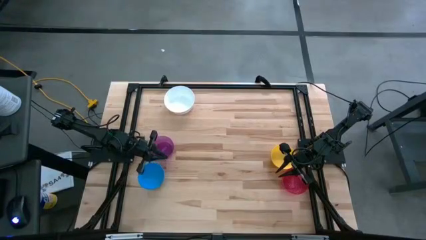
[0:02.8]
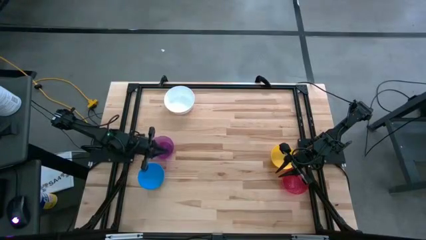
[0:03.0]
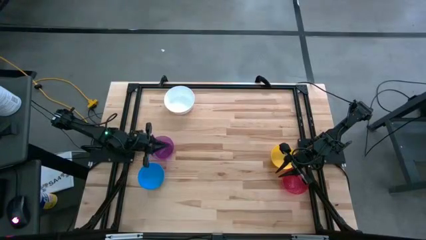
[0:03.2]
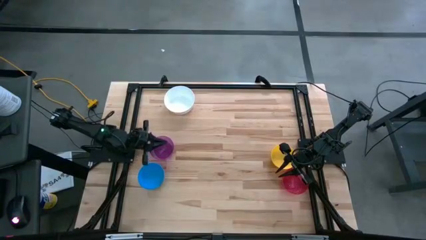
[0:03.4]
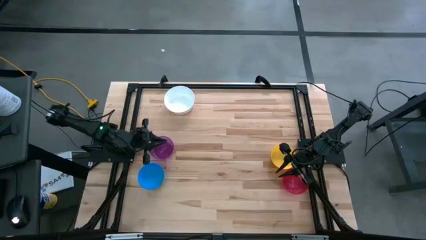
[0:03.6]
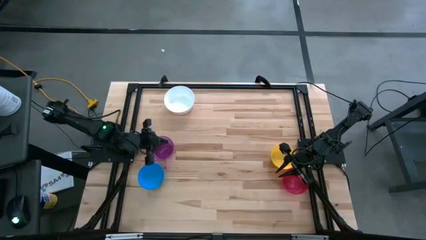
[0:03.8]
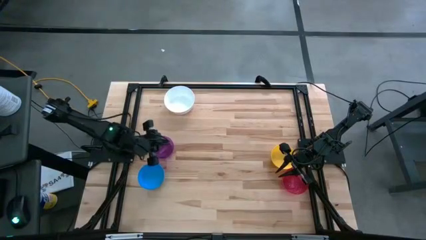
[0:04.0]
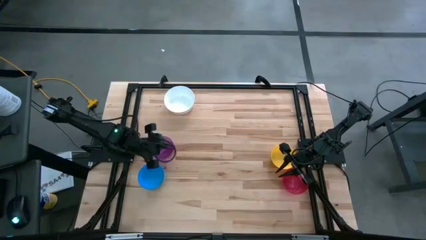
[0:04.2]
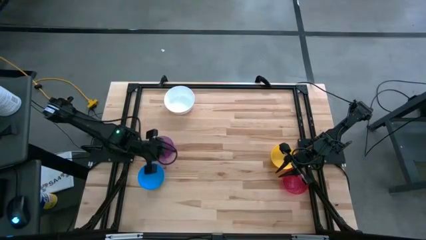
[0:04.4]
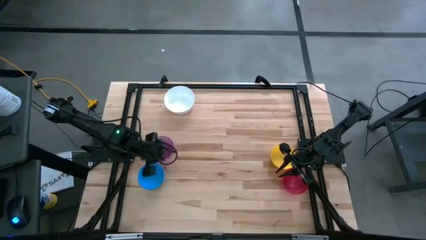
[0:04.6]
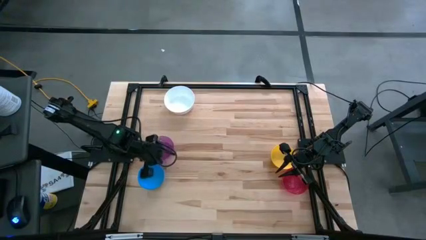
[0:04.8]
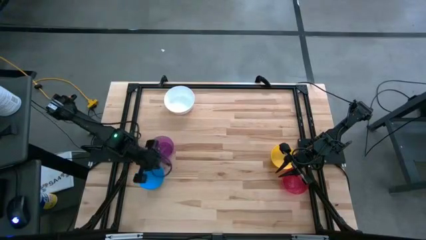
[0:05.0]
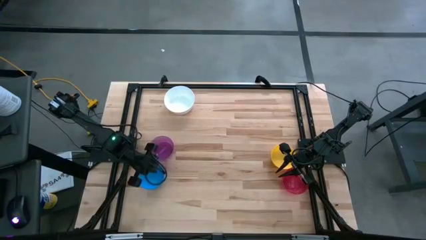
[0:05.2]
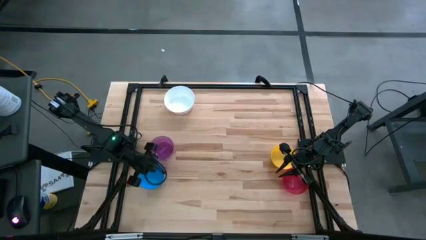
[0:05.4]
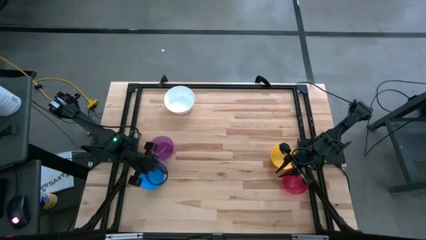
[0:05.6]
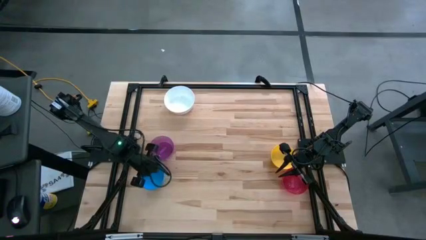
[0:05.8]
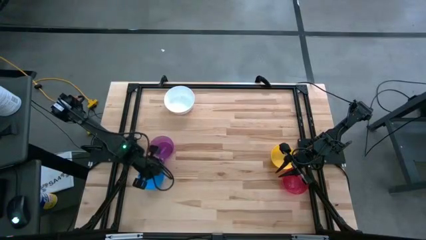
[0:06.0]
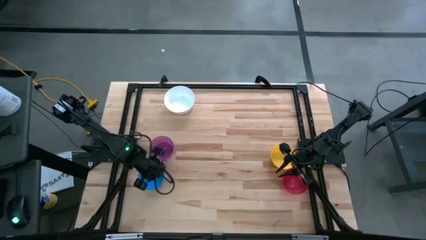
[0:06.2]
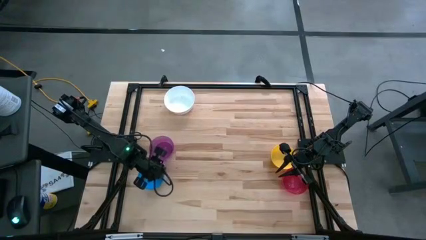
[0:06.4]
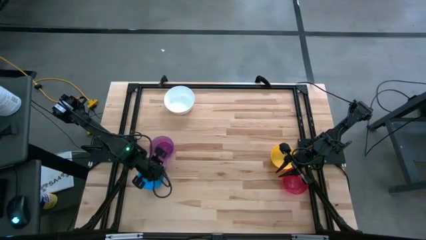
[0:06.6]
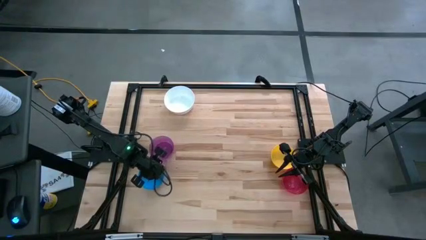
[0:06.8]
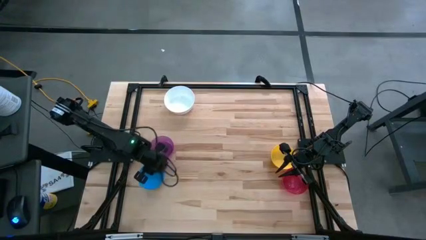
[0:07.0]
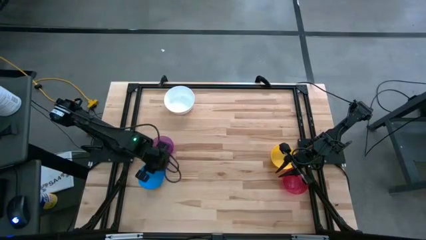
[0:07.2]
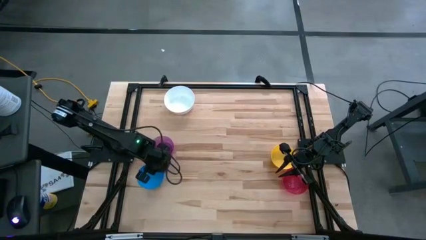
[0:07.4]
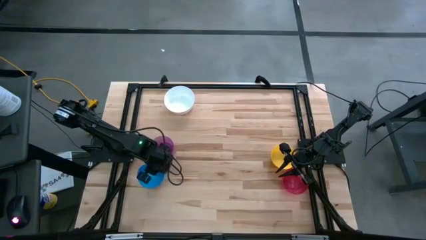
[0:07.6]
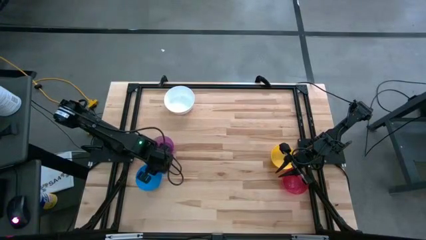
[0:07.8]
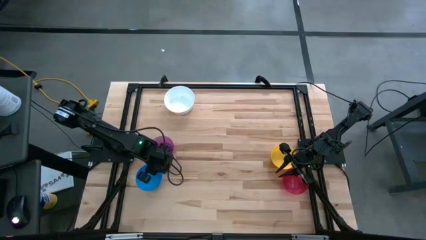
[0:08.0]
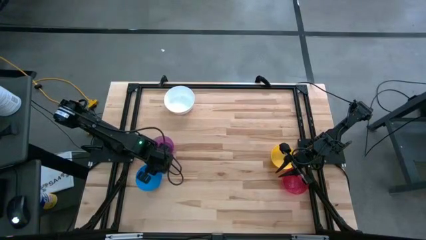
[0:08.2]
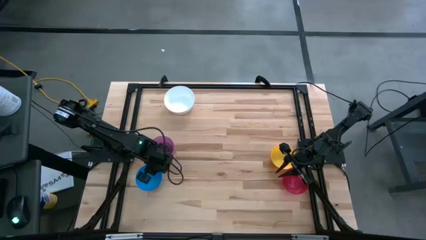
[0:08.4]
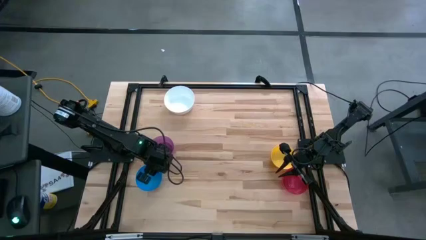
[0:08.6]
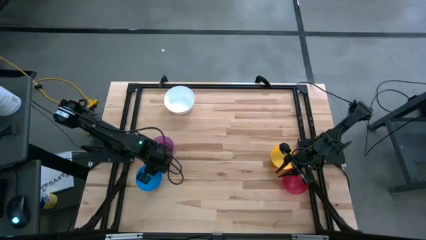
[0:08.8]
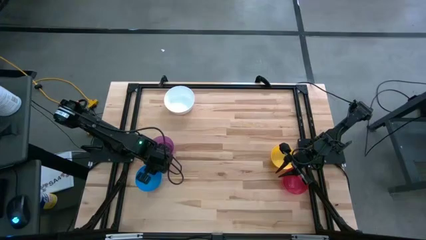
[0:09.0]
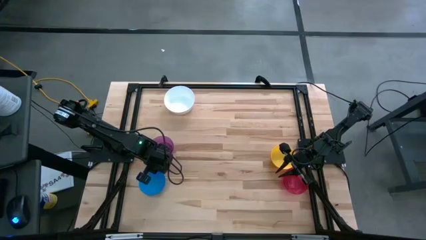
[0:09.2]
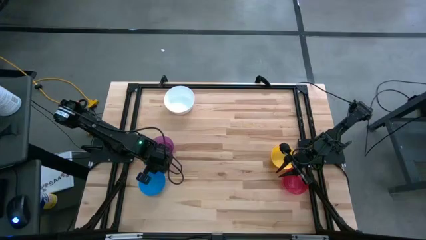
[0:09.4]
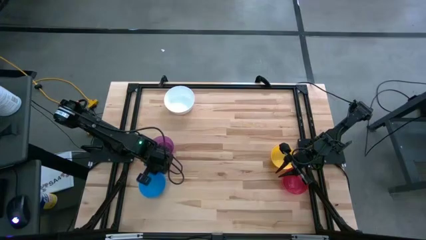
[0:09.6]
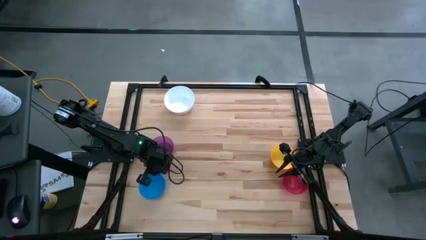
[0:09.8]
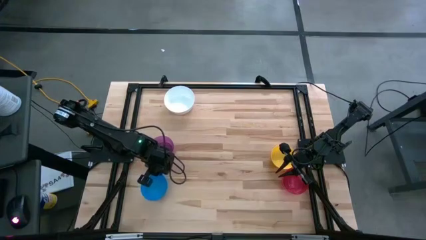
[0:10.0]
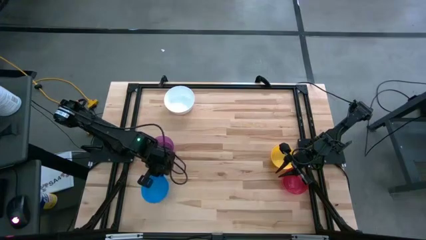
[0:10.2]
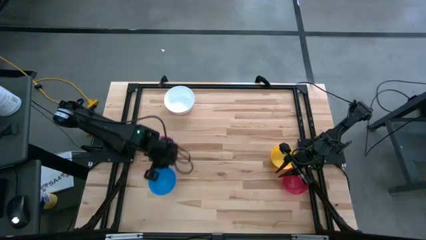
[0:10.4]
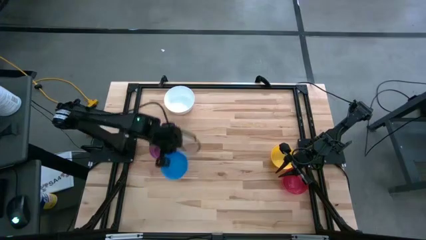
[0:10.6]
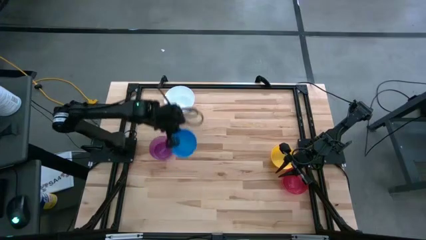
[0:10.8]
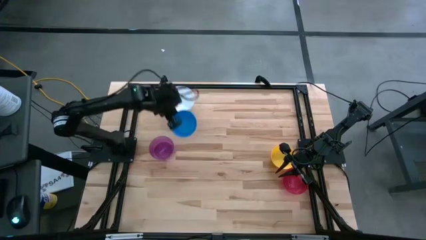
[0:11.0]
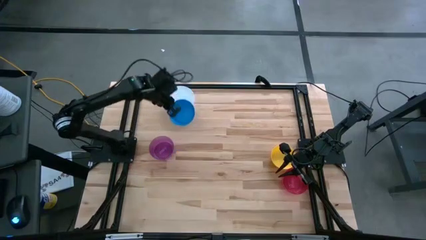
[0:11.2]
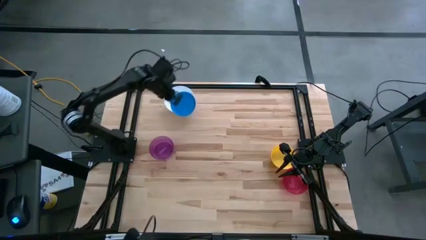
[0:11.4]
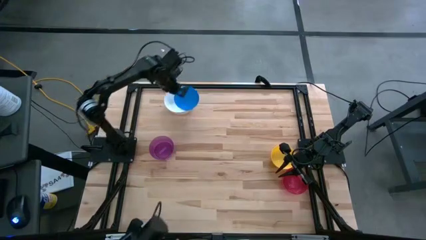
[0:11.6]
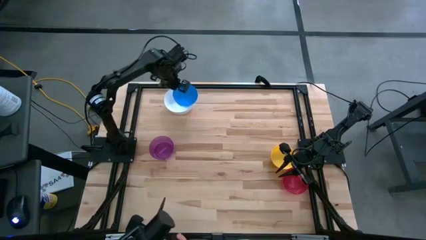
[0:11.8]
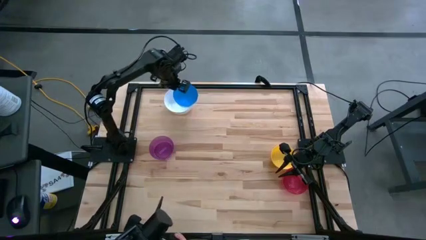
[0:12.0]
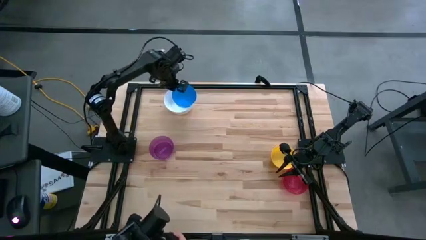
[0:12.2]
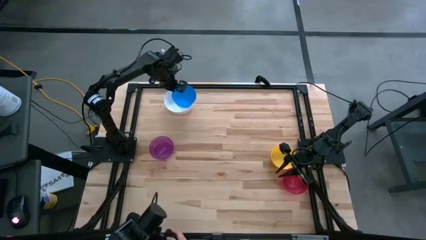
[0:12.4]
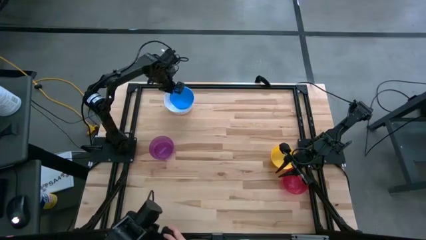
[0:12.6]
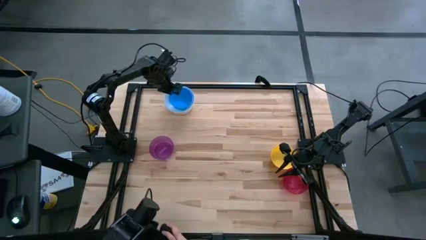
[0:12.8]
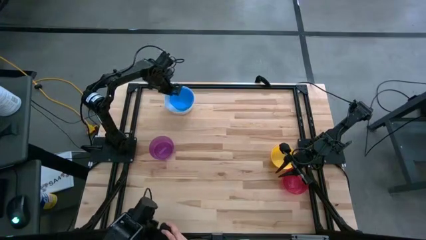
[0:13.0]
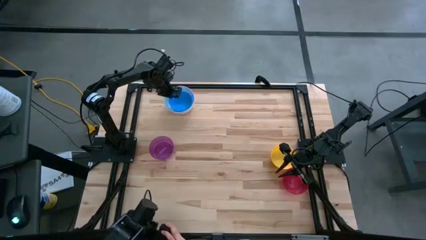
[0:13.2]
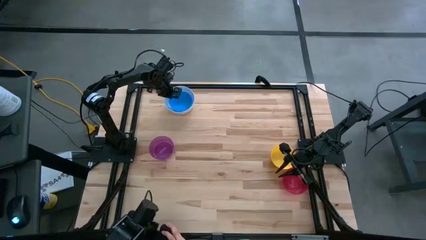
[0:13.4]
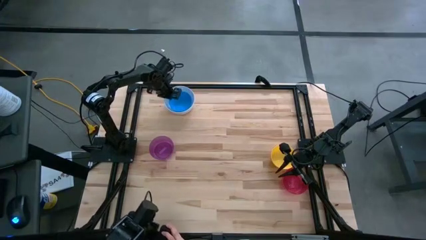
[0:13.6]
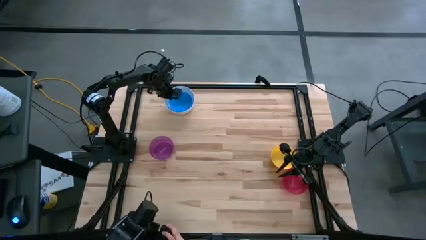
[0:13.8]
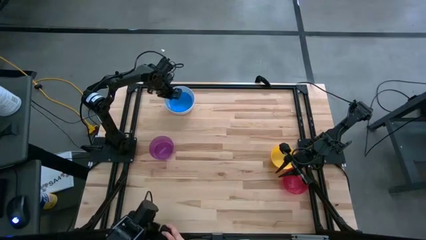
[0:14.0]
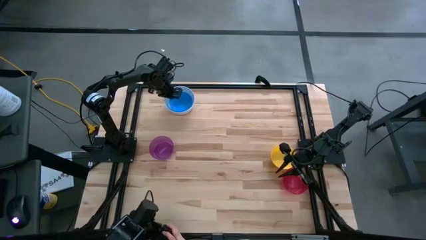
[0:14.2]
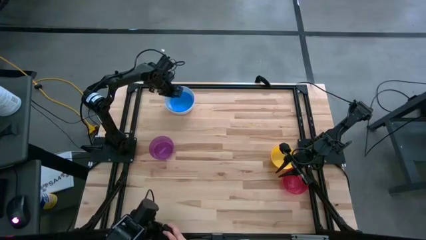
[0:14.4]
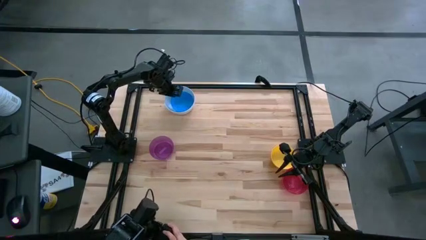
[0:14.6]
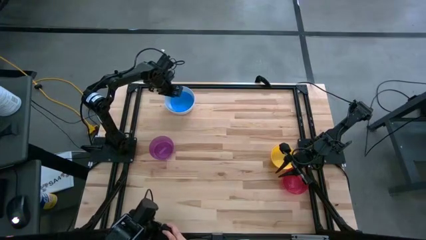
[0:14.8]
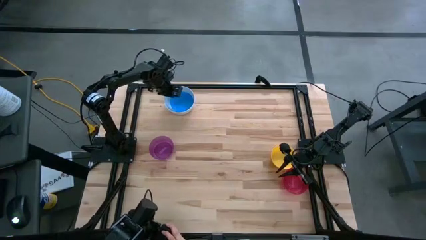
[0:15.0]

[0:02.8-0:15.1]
Stack the blue bowl on top of the white bowl

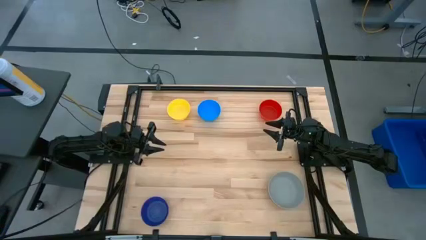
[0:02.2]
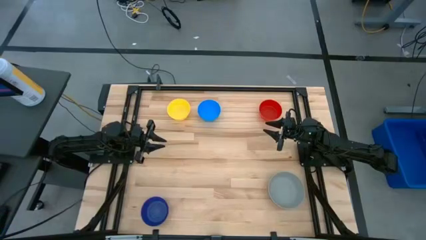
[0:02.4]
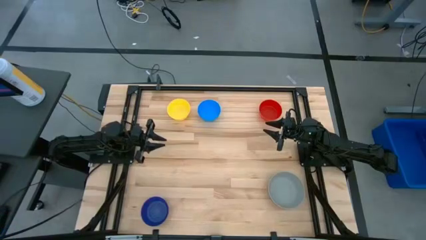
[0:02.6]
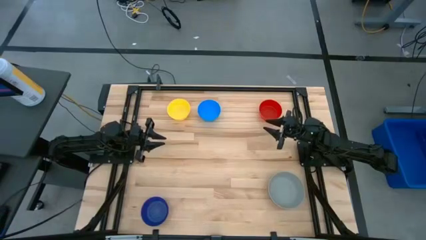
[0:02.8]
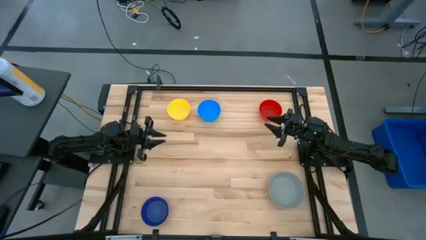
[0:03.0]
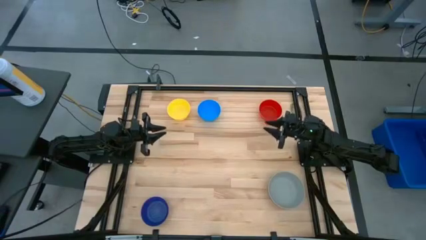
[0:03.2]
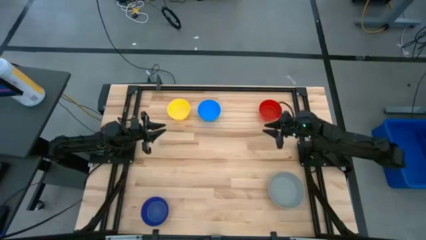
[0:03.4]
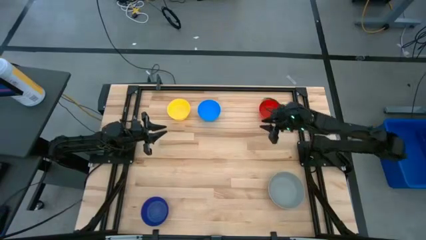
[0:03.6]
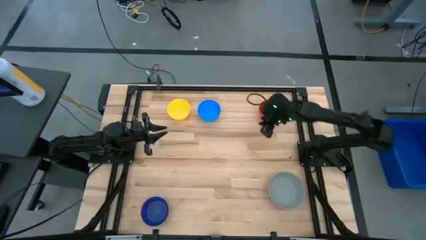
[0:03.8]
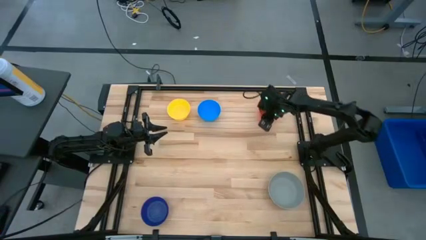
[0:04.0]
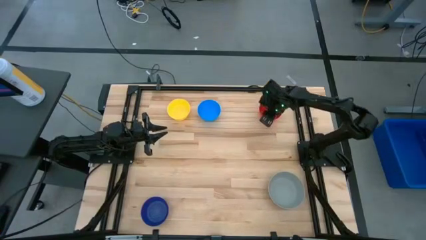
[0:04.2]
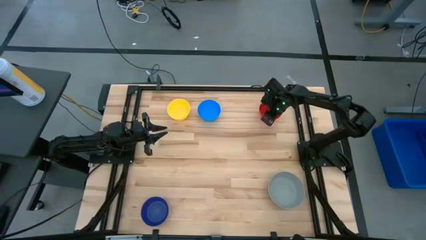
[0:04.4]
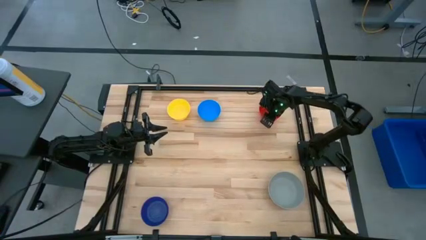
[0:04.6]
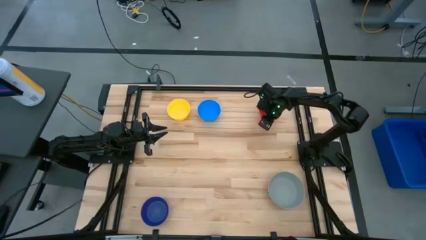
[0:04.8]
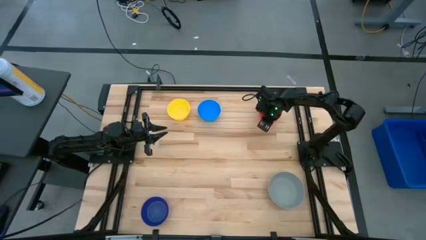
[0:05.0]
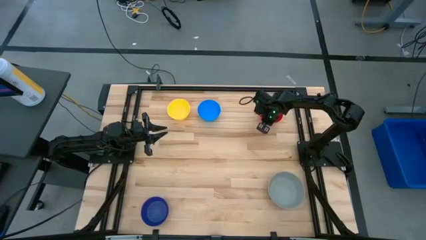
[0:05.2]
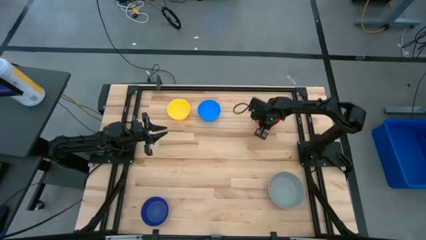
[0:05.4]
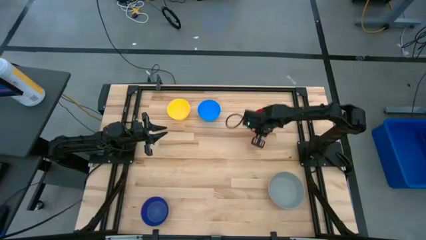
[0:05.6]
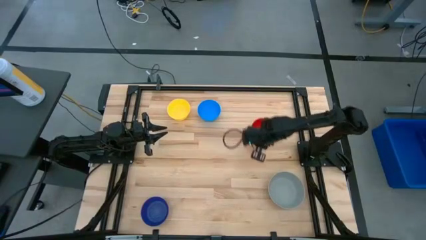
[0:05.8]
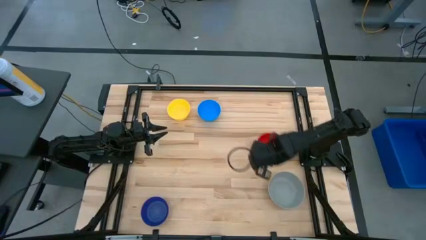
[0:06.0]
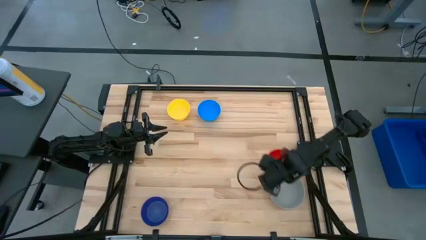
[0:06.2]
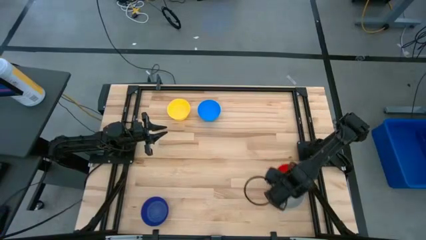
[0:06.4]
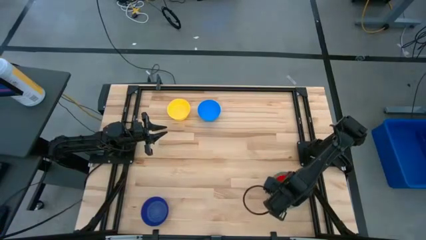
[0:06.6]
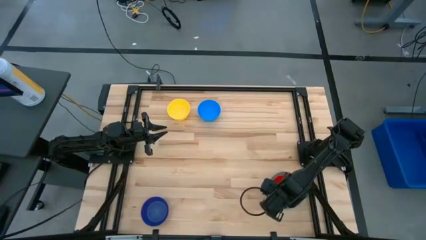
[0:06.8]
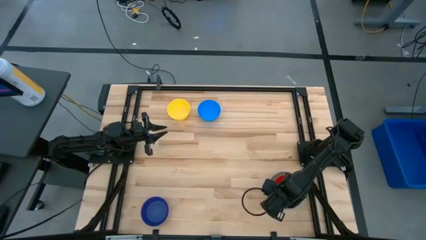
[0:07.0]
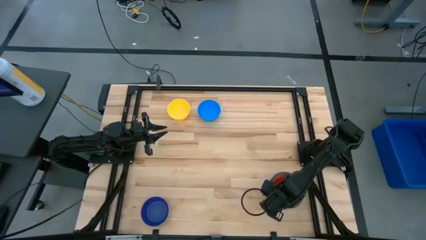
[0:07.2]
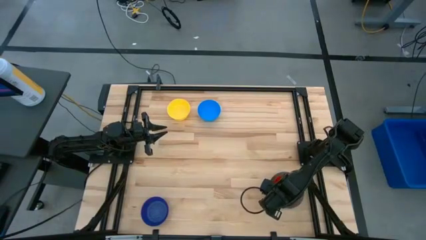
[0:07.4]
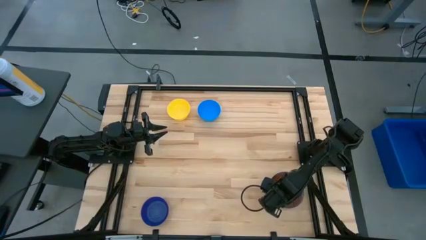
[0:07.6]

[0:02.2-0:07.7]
Stack the red bowl on top of the gray bowl
